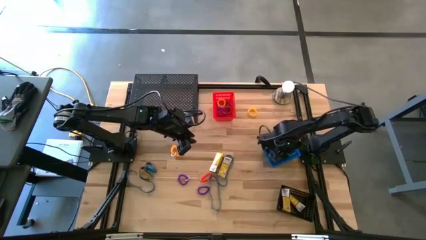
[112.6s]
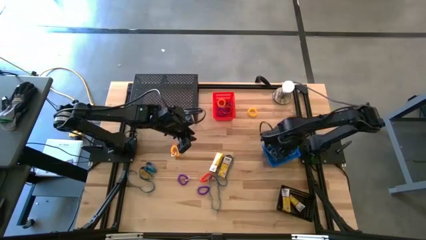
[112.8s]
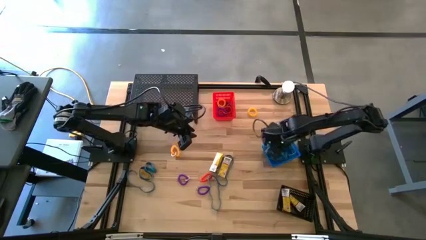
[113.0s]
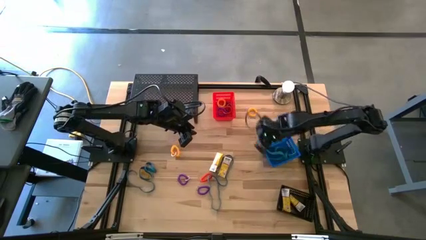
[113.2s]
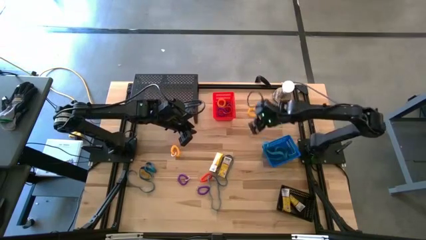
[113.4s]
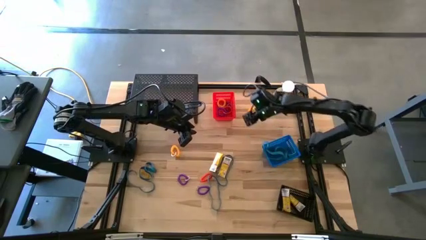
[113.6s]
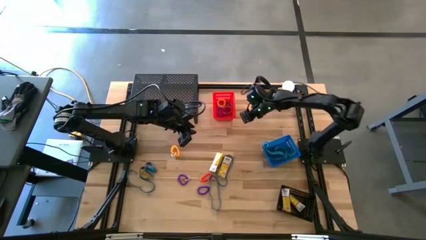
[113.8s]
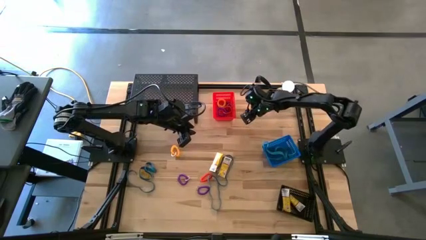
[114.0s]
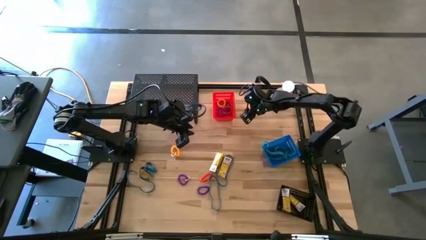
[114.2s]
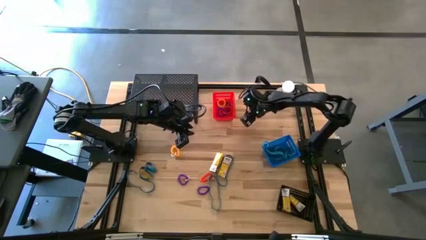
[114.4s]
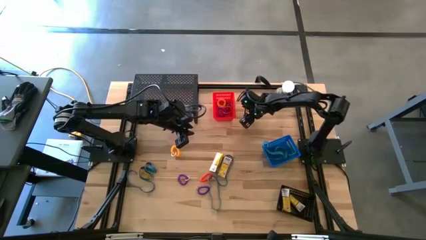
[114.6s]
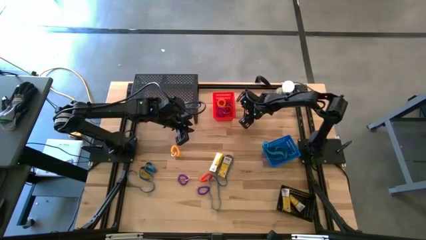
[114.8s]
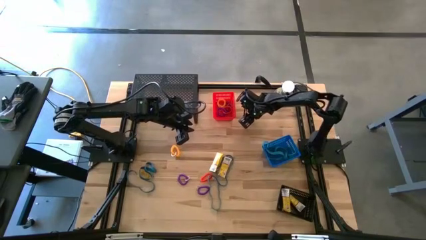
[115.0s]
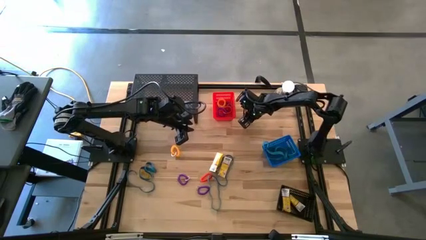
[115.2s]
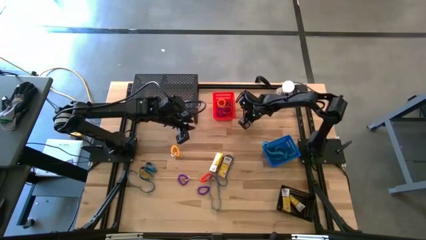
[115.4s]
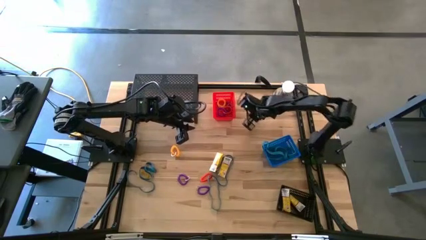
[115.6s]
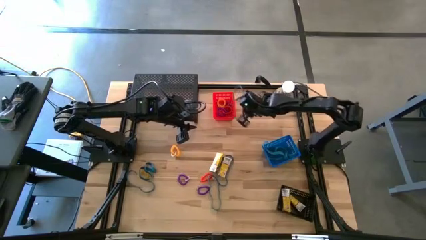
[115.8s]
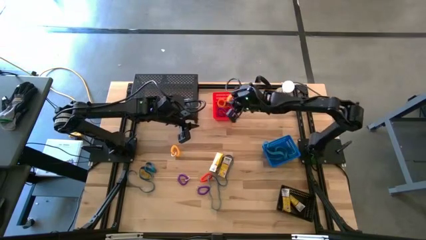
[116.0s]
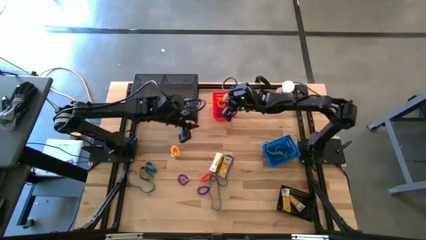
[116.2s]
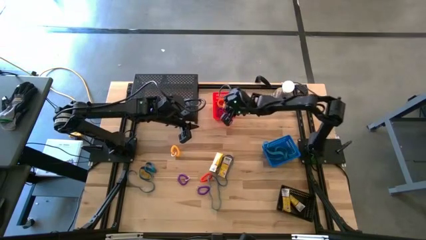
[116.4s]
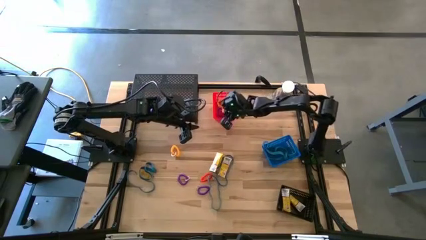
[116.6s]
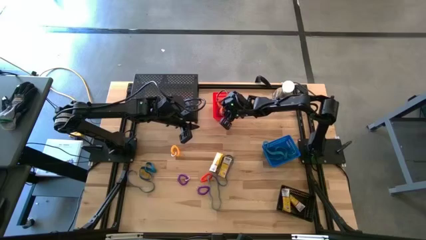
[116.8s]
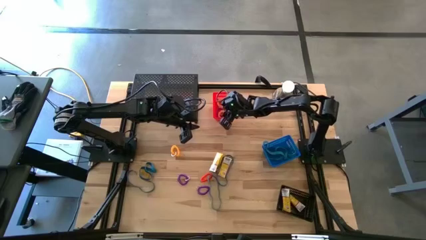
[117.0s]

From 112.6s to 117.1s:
Task: Pick & Place Office Desk Supplies
Put the yellow spring keychain into the red bin

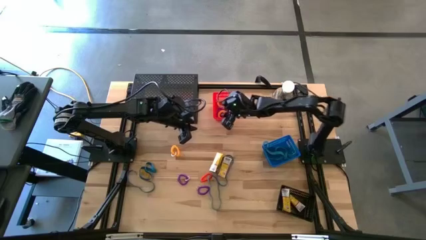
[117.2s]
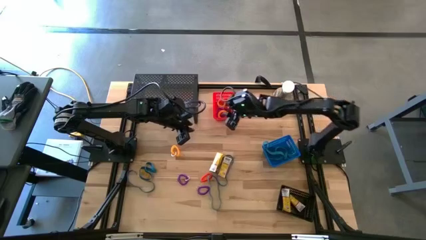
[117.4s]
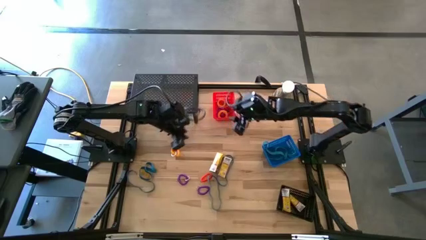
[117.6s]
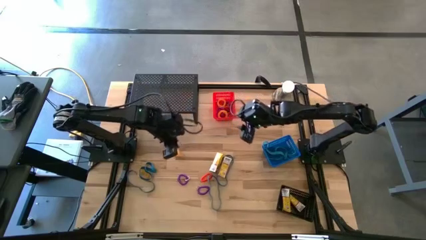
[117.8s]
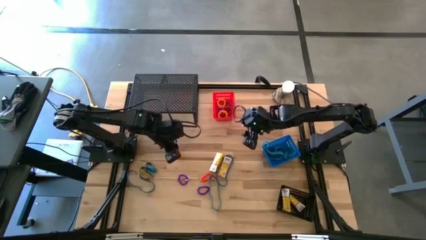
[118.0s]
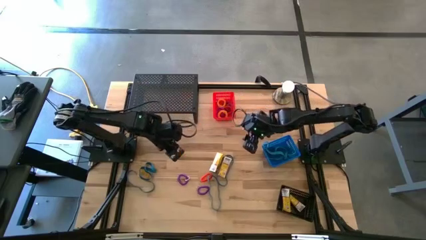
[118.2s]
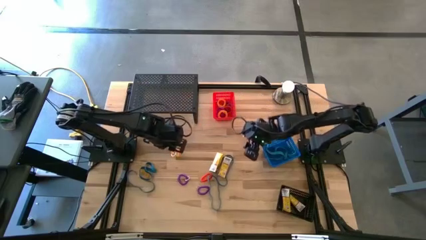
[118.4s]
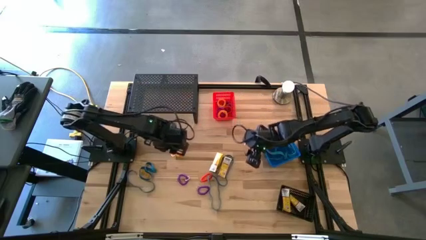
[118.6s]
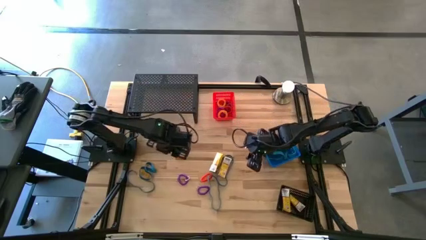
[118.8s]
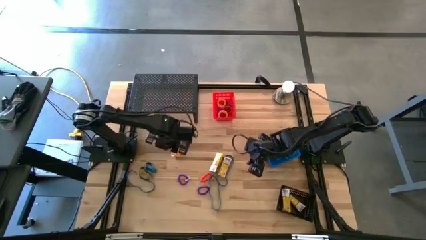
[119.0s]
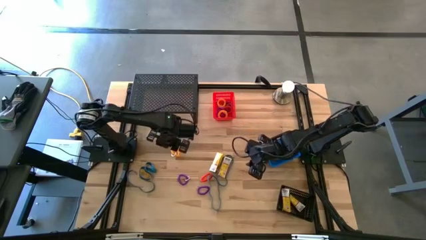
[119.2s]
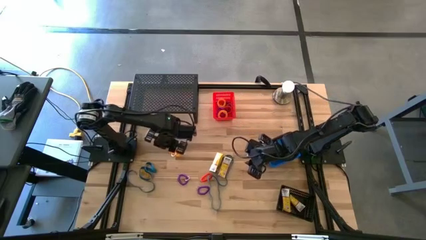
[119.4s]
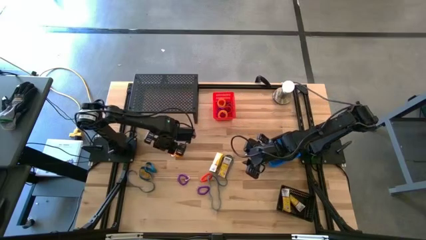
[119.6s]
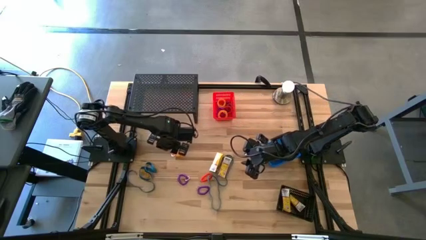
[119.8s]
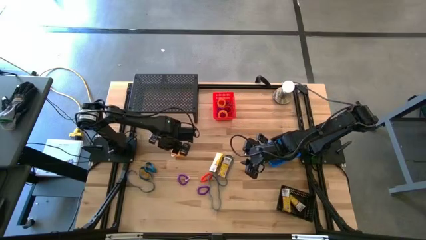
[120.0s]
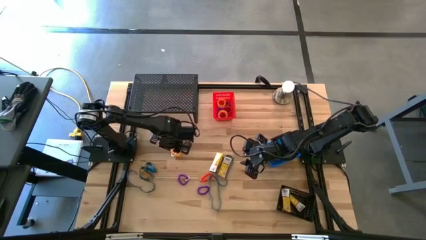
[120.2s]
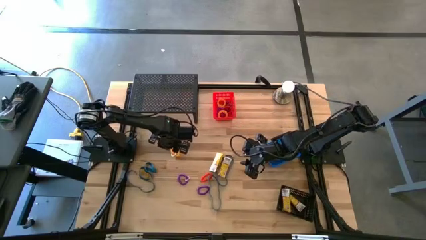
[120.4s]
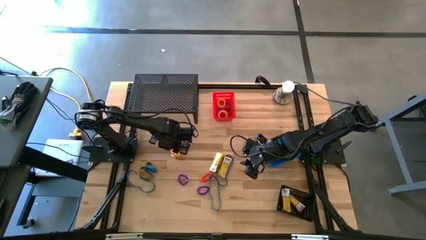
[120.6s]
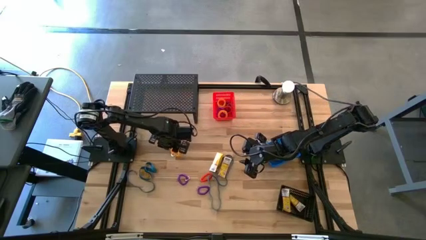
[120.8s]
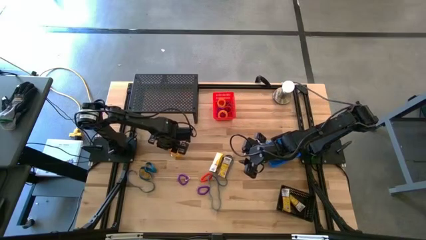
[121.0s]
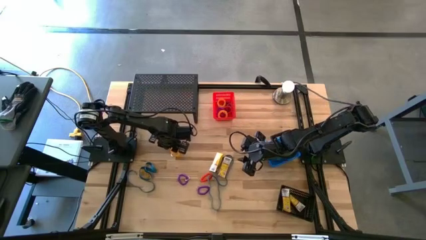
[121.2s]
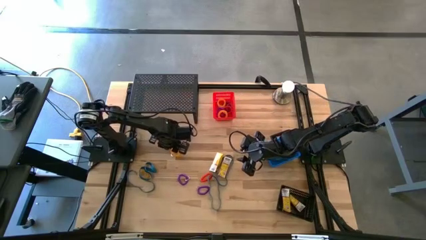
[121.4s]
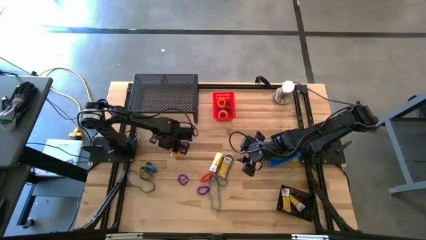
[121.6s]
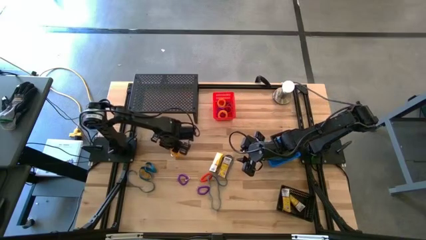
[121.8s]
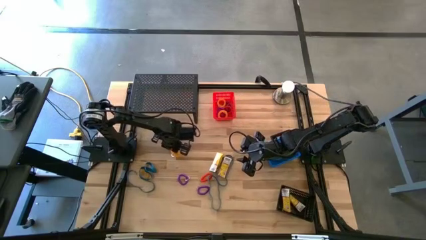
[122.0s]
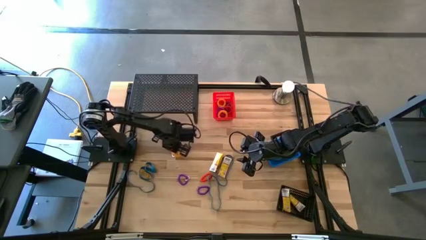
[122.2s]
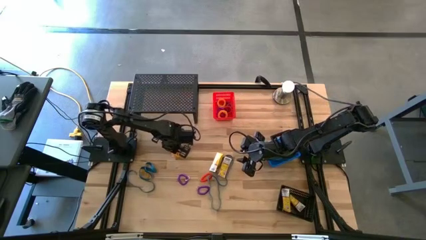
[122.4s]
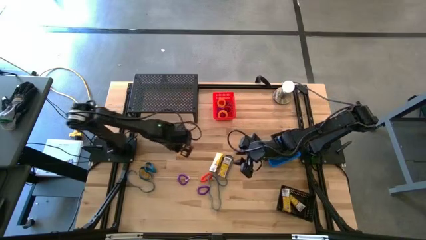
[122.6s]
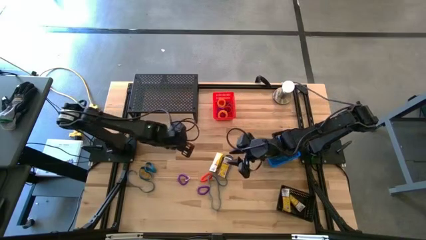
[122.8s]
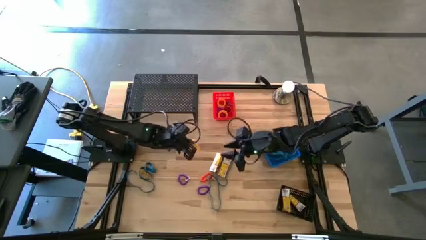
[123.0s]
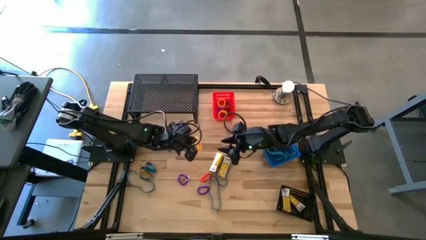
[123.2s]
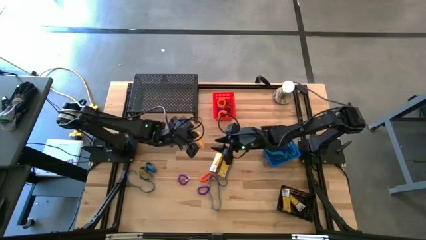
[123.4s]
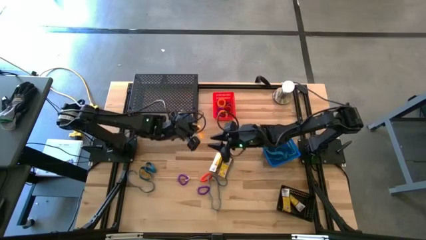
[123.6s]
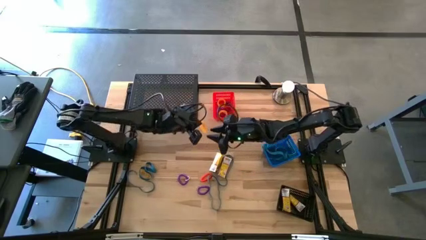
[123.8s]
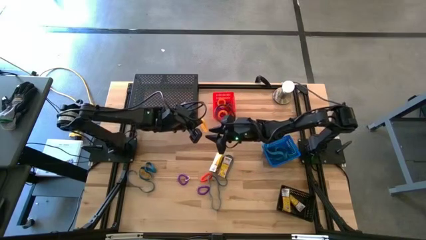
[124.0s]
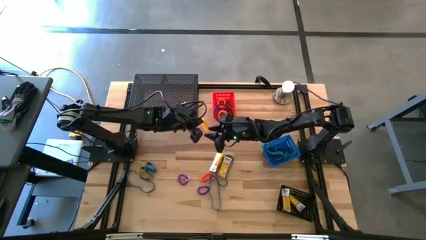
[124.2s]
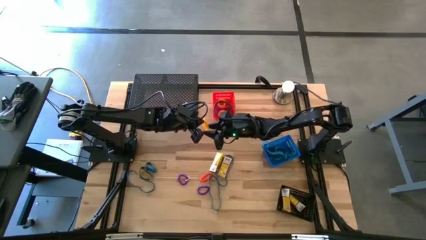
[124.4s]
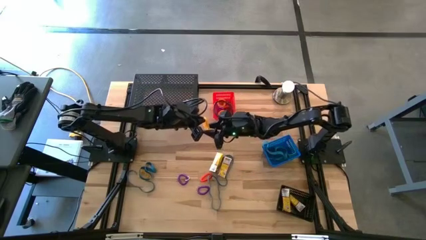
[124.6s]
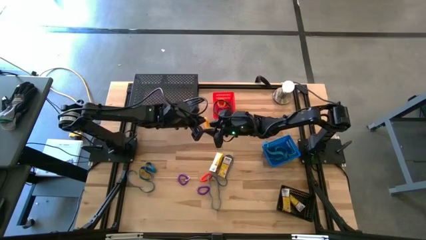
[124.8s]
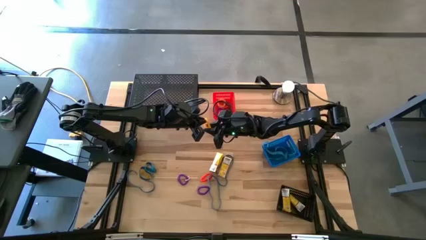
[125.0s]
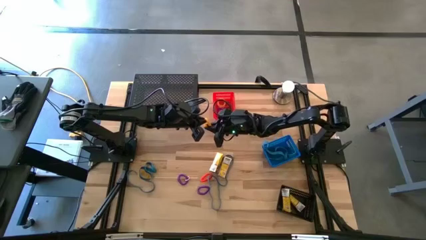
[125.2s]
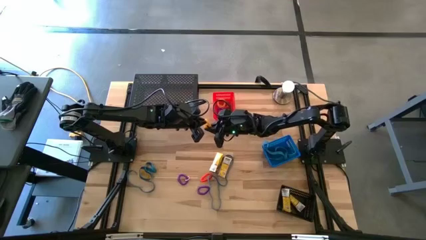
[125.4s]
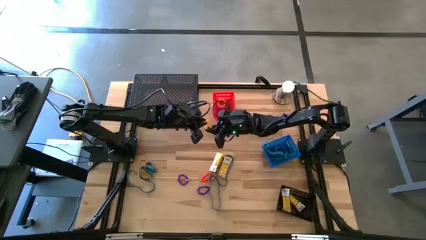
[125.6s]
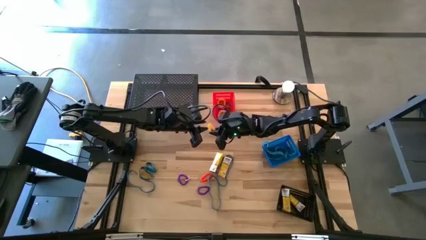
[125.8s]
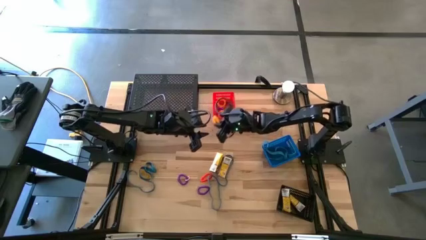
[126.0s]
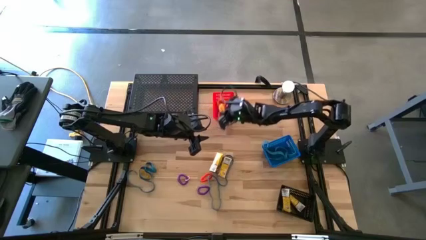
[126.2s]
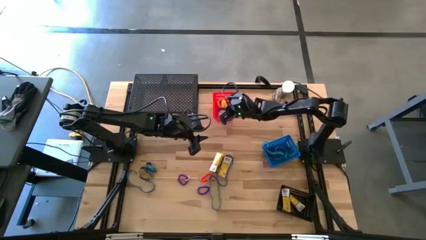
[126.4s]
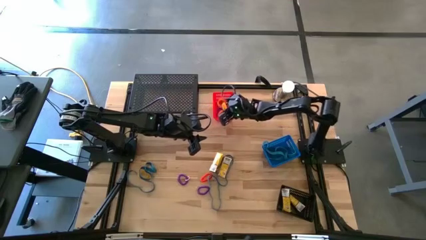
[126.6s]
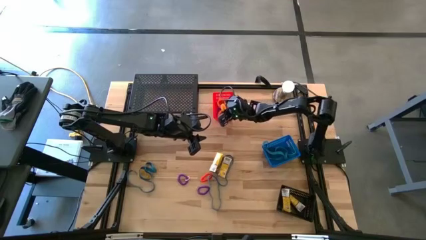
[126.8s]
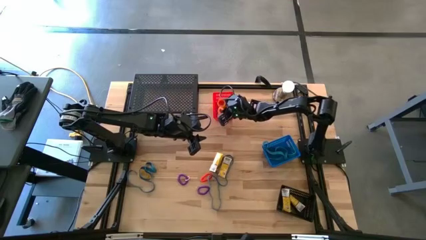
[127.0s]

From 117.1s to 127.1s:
Put the yellow spring keychain into the red bin

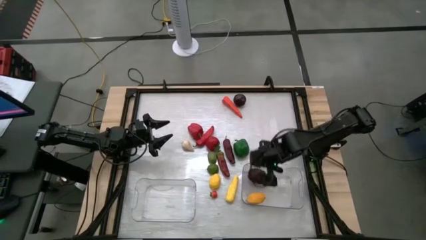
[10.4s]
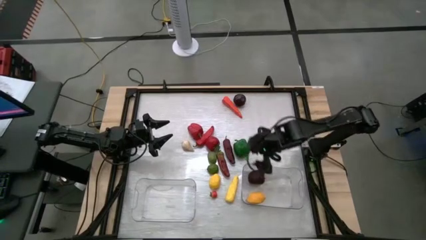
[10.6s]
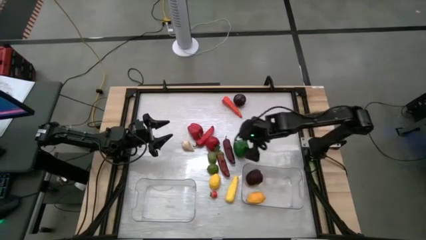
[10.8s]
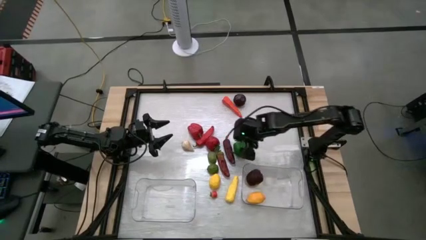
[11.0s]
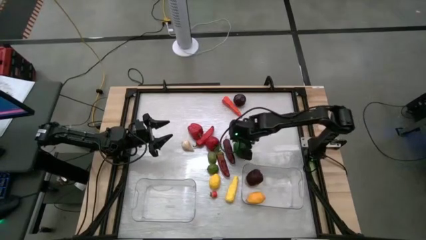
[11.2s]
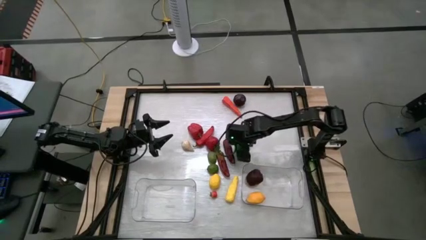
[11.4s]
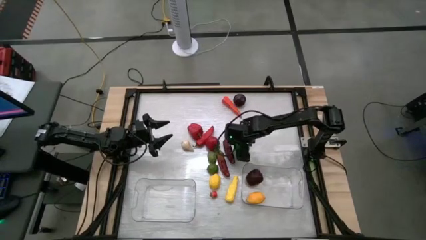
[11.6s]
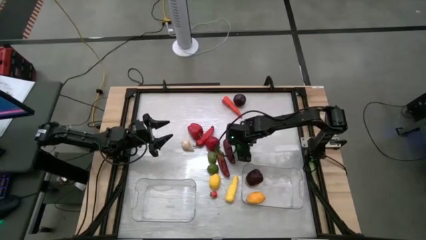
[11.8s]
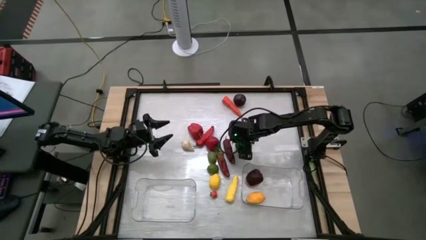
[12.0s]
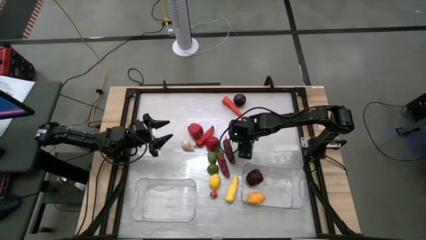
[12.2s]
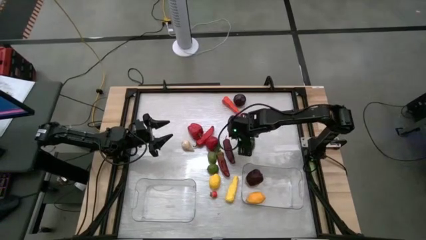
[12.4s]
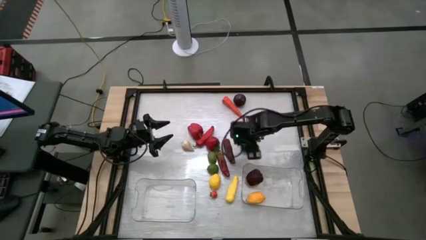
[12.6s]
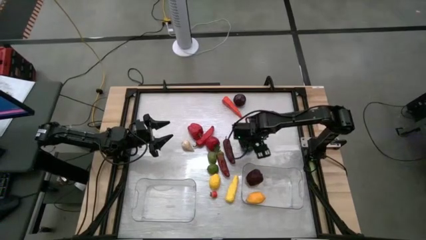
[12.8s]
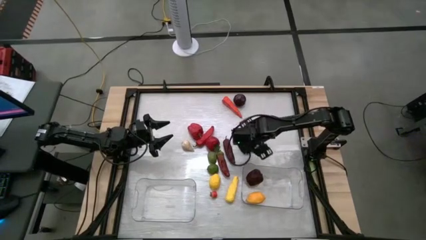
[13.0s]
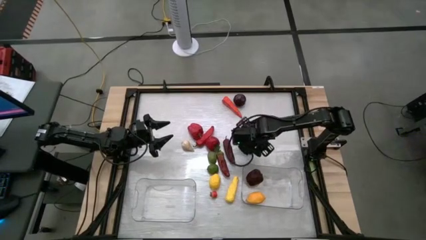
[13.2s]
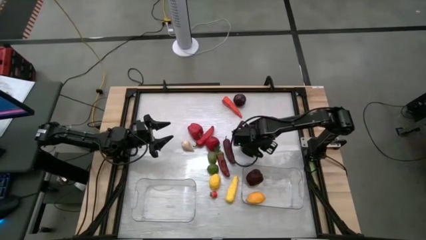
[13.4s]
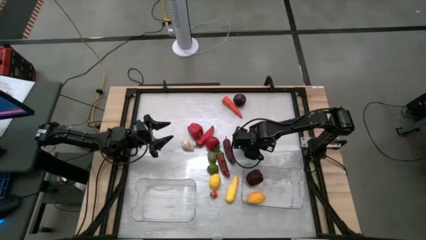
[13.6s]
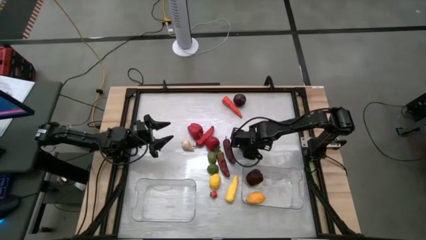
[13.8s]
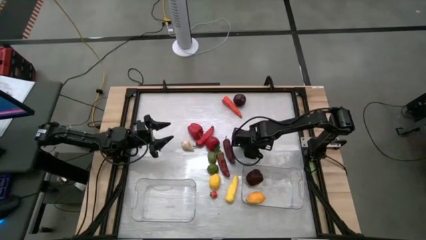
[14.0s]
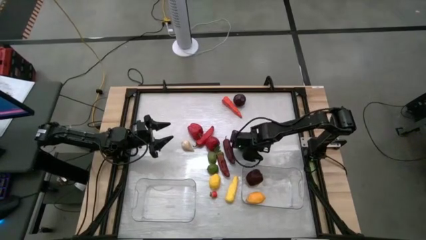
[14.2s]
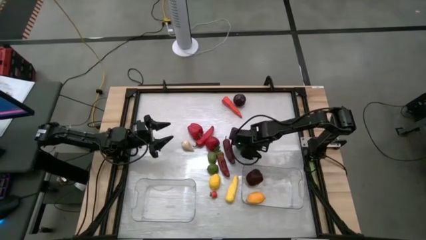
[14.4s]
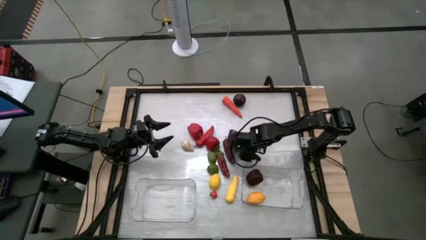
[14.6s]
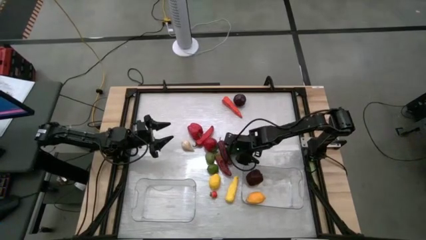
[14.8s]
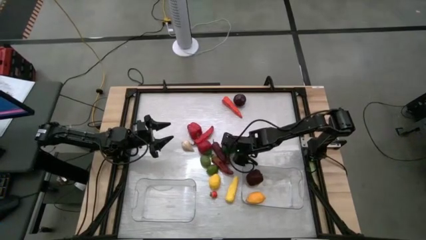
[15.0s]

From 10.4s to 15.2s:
Task: Sort produce into baskets
Put the green bell pepper into the left transparent bin
